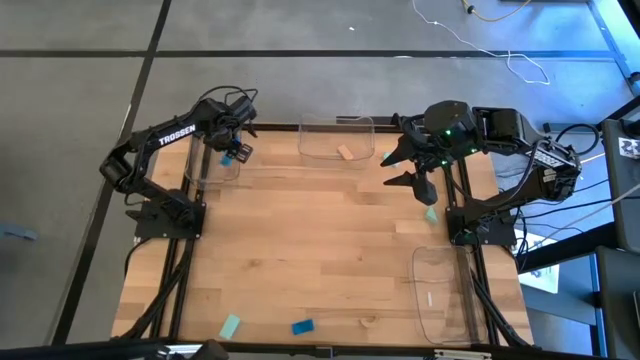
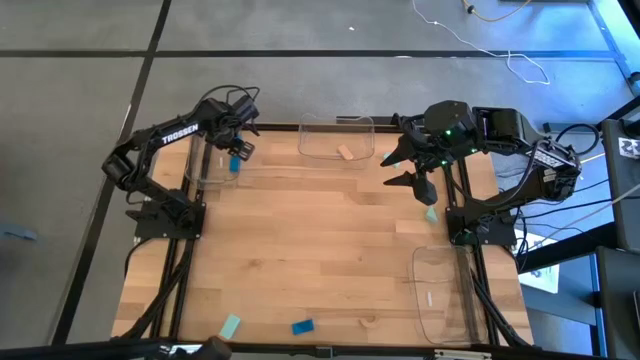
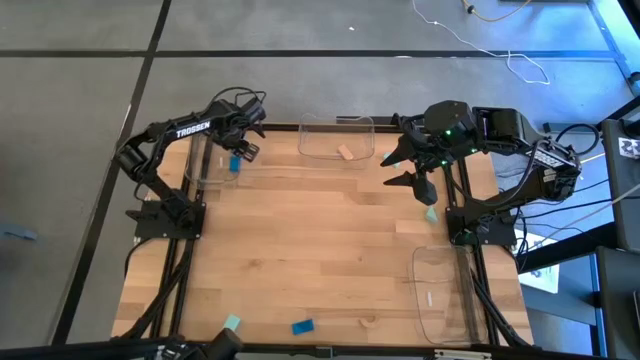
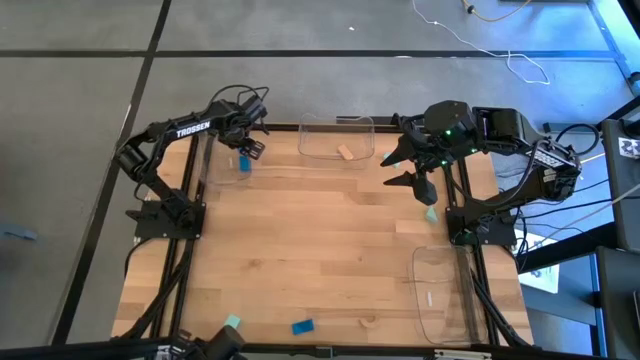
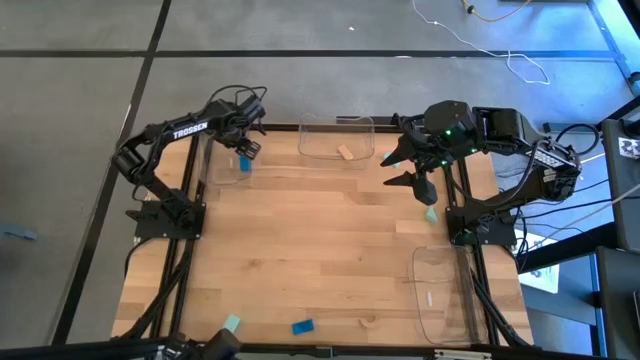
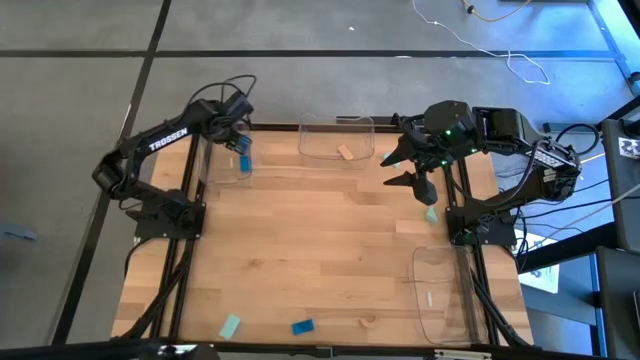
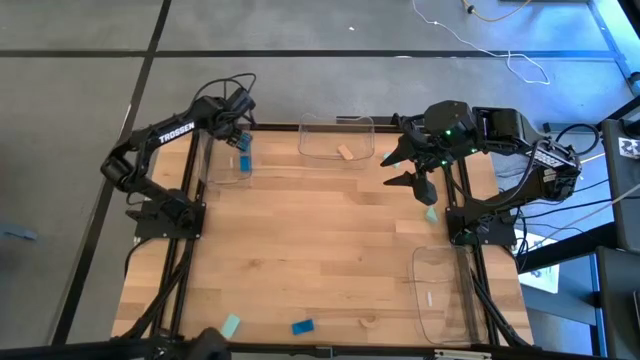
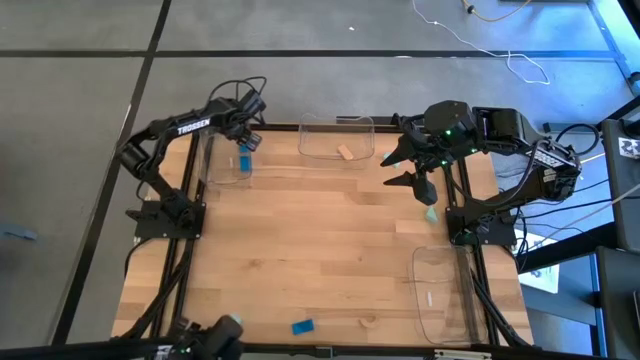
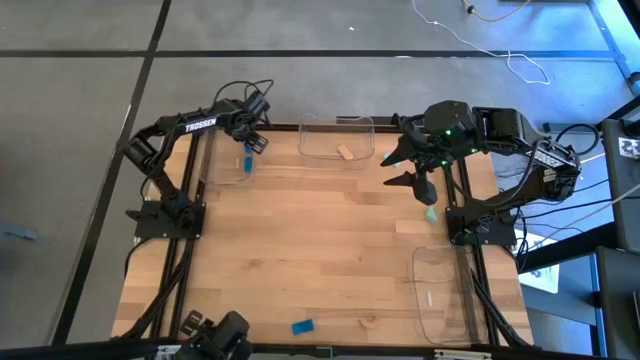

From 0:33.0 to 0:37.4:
Task: Sort & place blocks by color
Adjust the left transparent bin

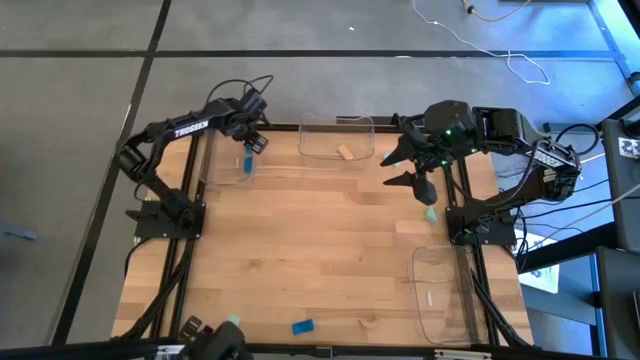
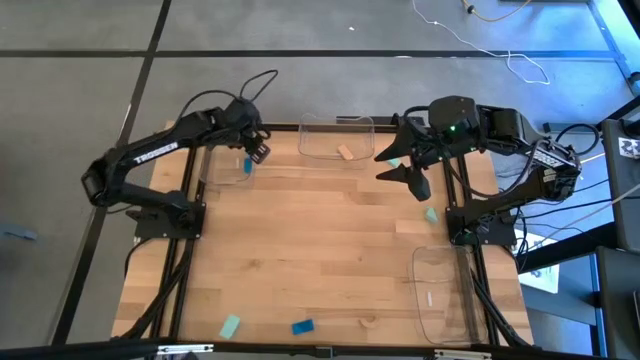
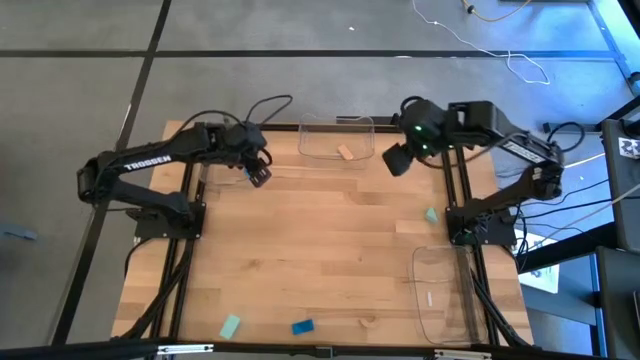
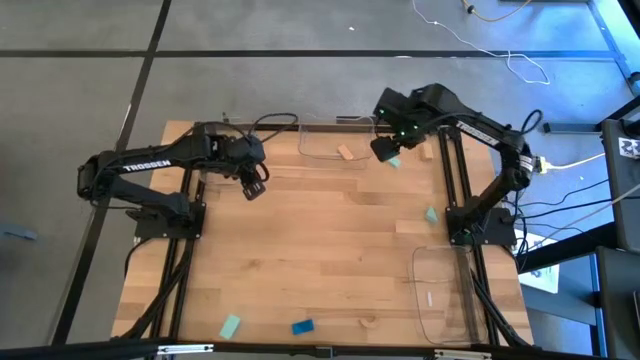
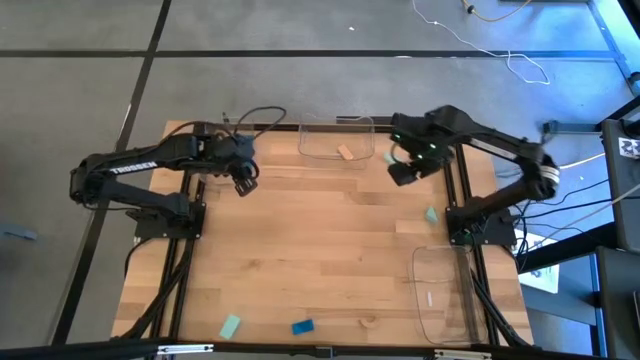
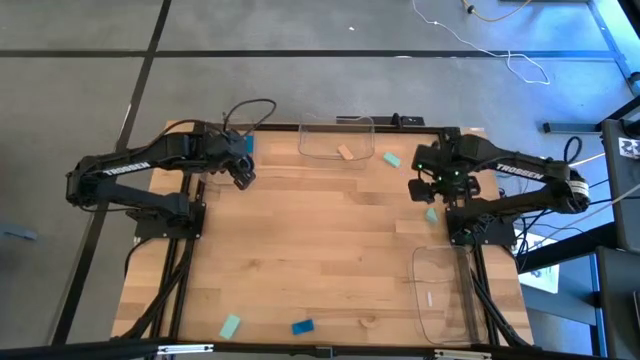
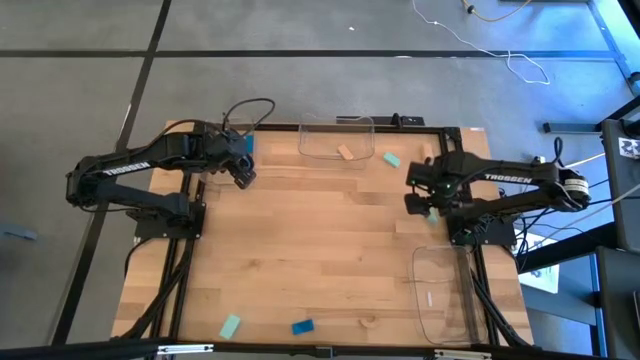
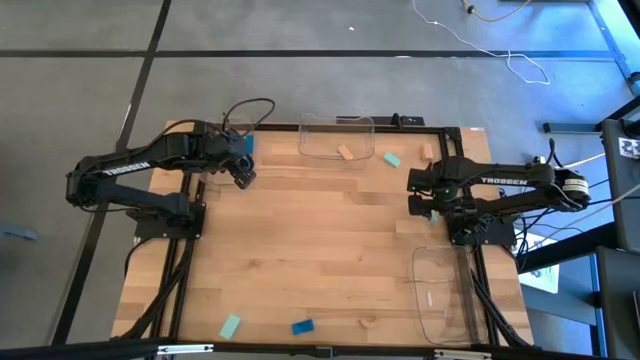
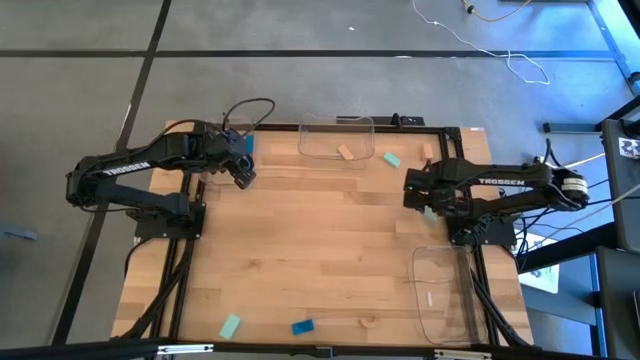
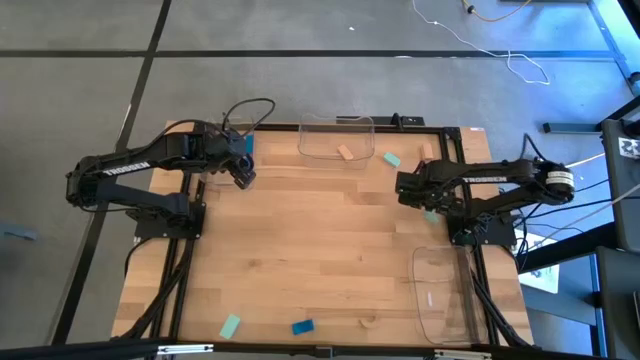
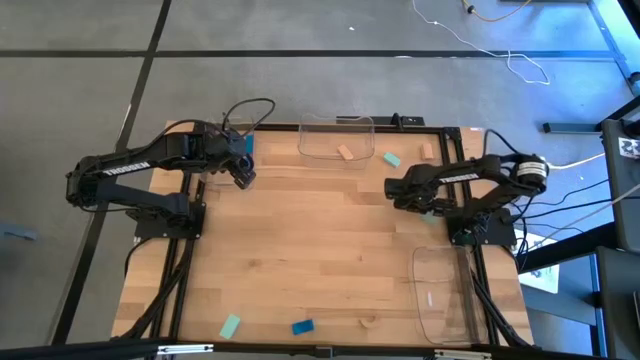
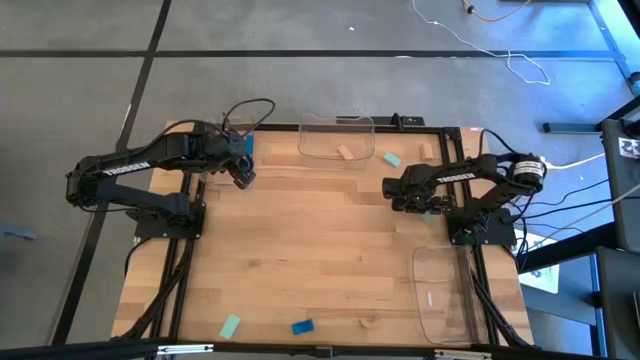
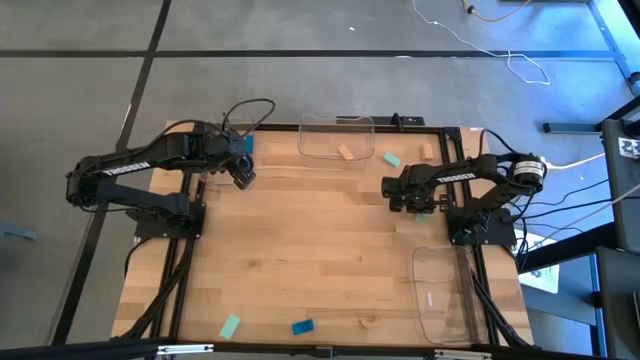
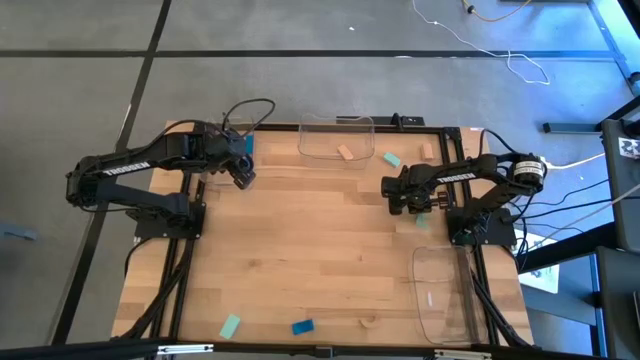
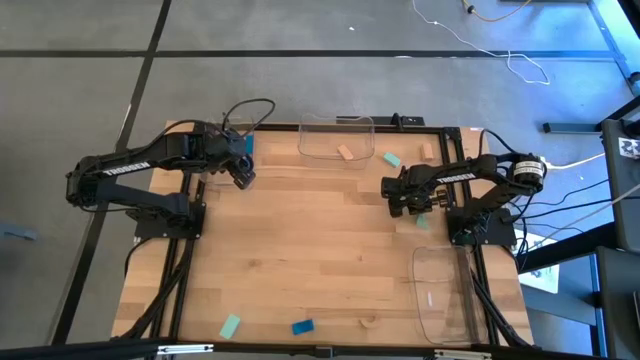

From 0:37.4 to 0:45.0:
Put the middle right light blue block into the bottom transparent bin

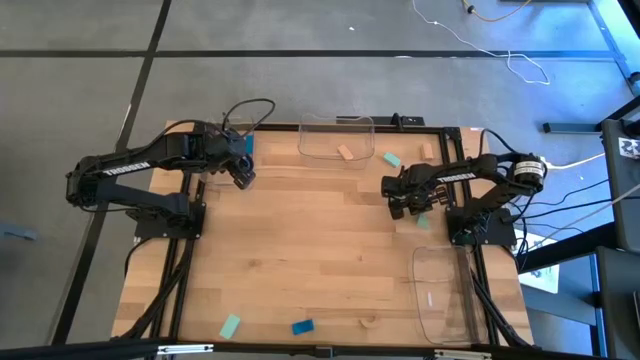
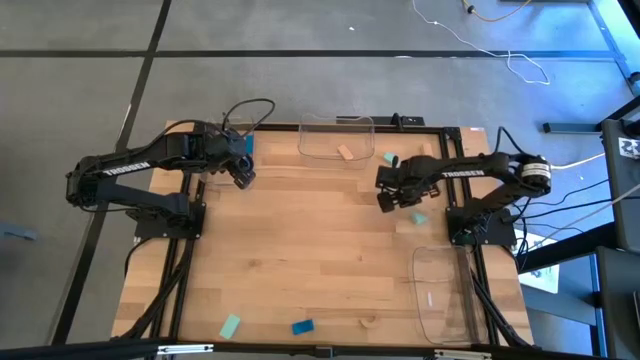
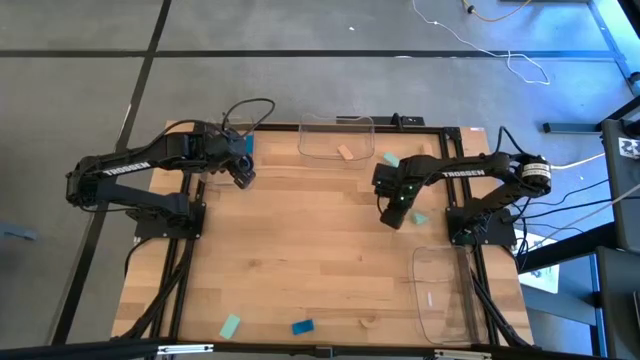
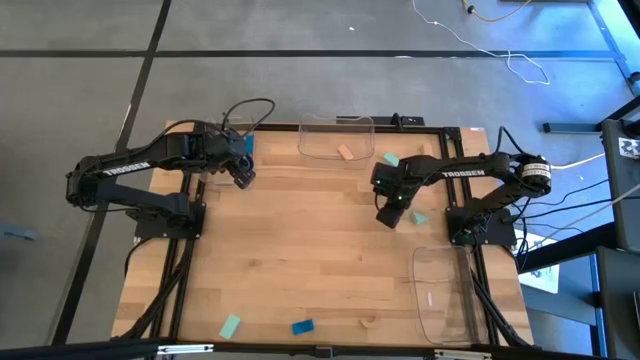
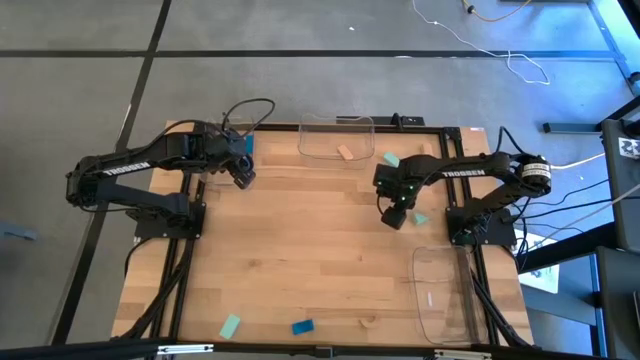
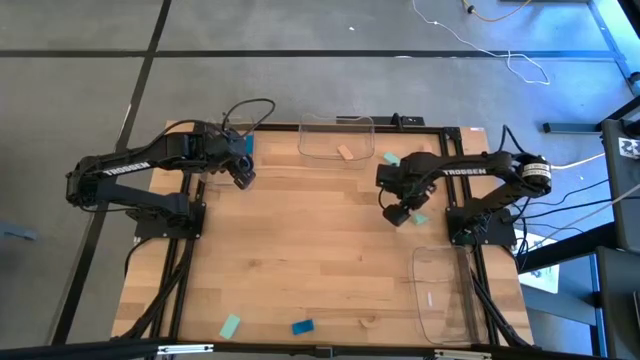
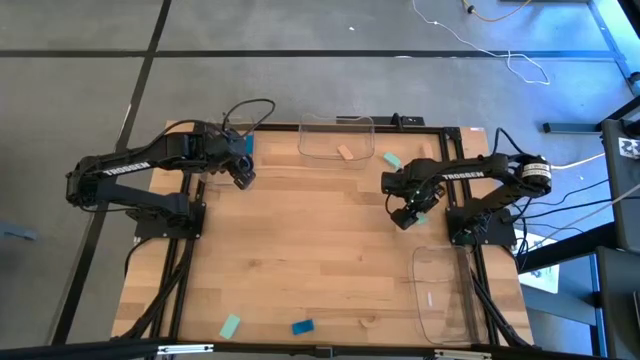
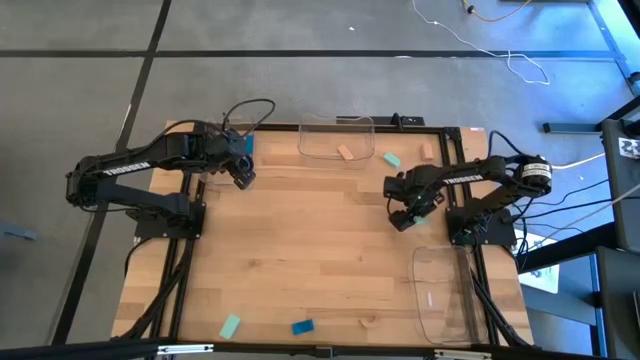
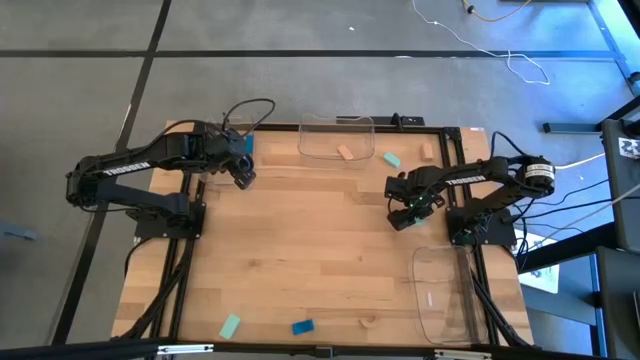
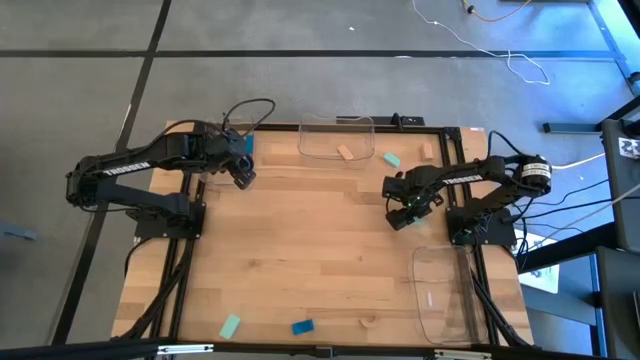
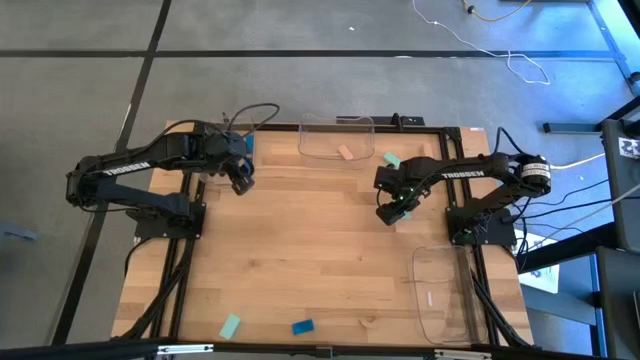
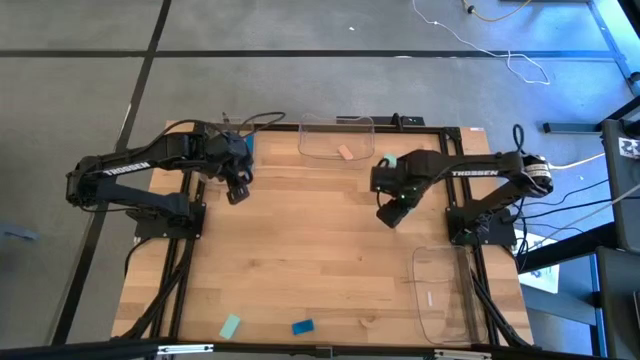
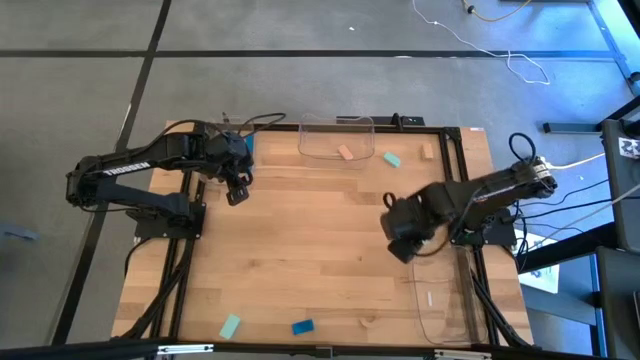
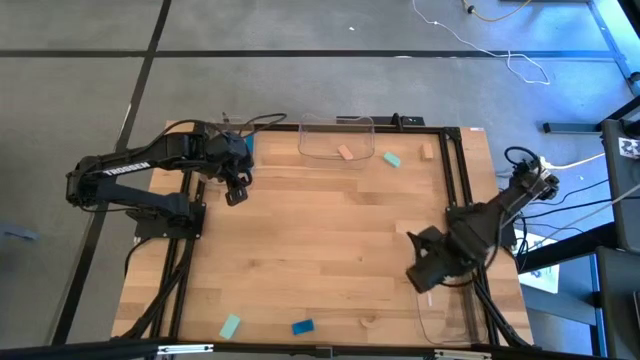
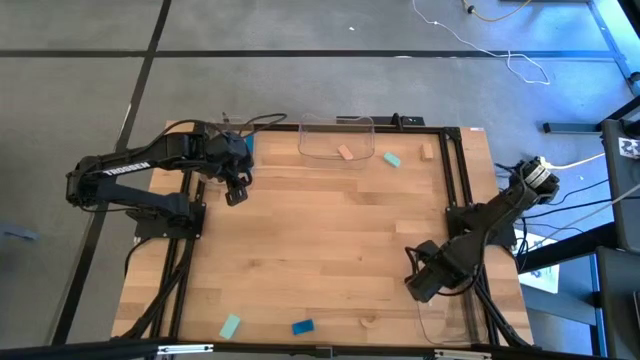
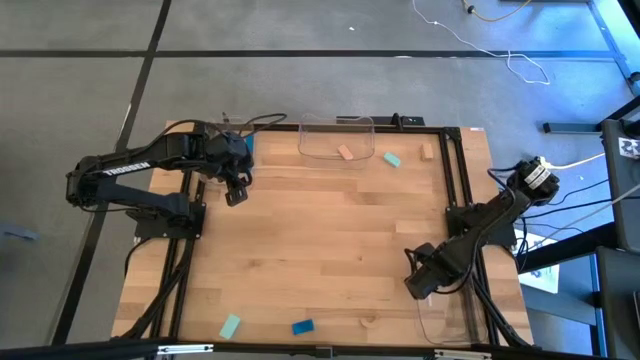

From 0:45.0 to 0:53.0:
Put the middle right light blue block into the bottom transparent bin

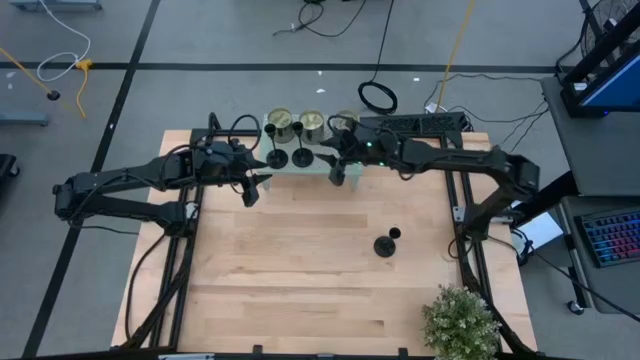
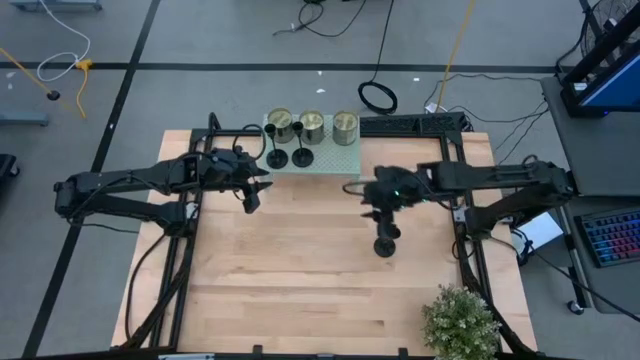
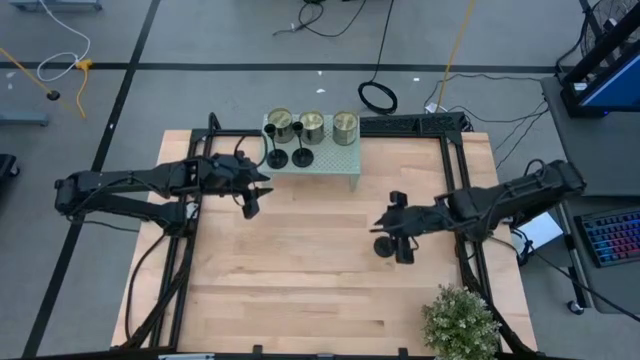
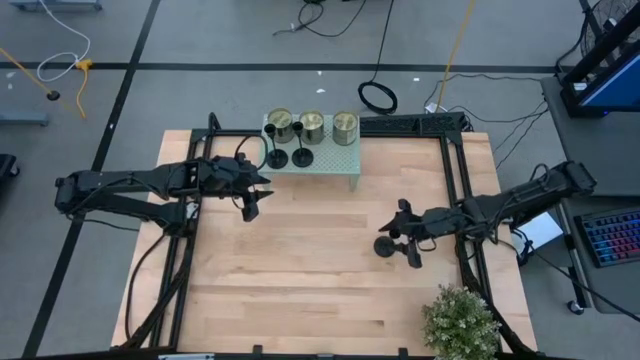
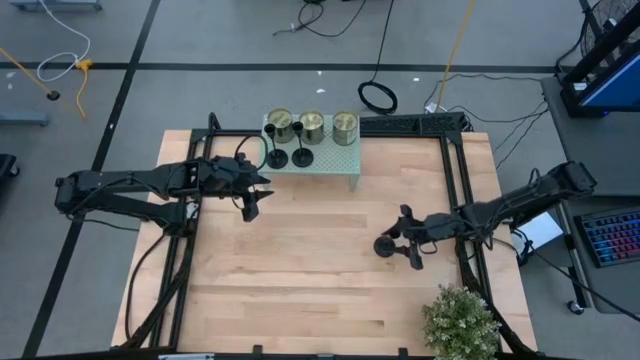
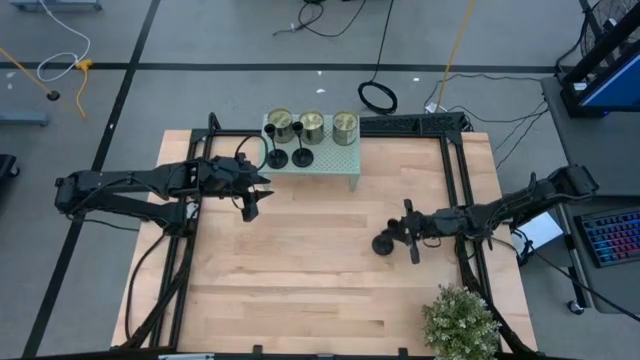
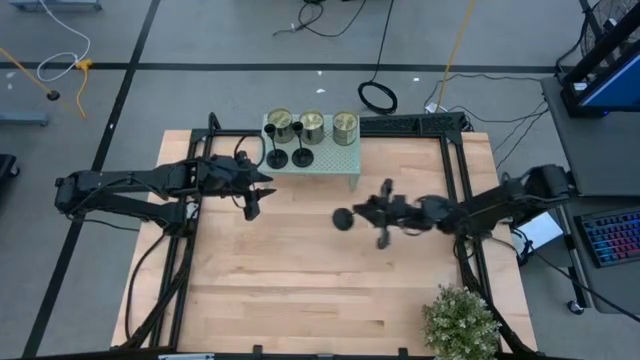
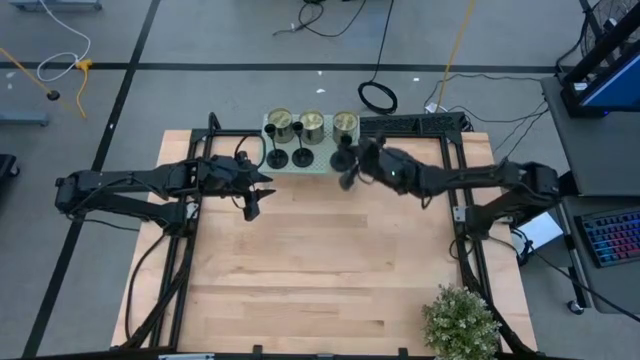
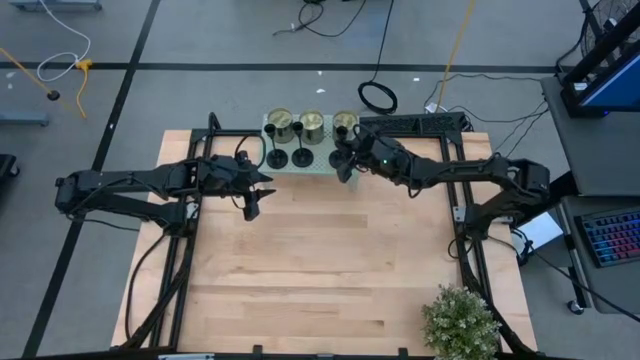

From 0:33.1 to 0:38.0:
Task: Pick & Place candle stick holders
Put the black candle holder on the shelf
